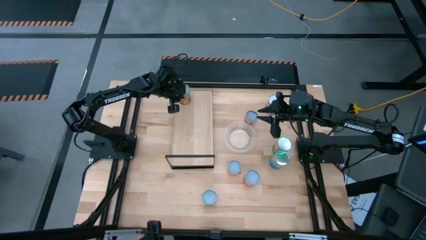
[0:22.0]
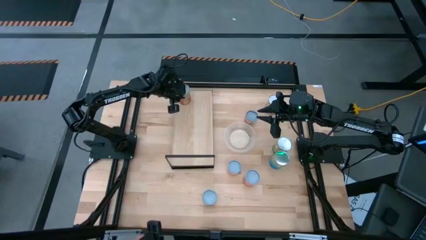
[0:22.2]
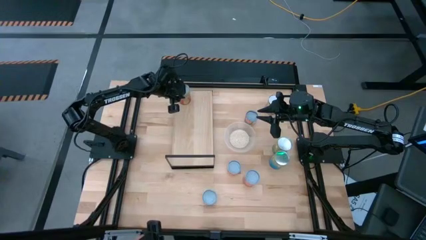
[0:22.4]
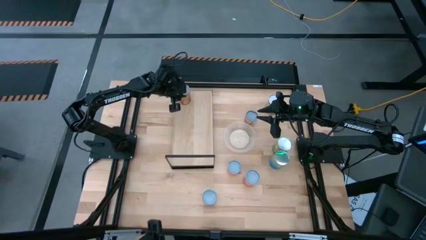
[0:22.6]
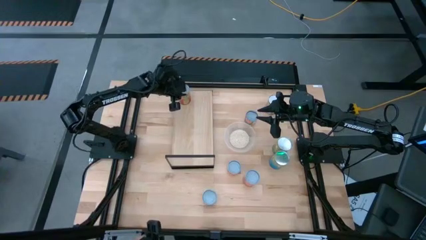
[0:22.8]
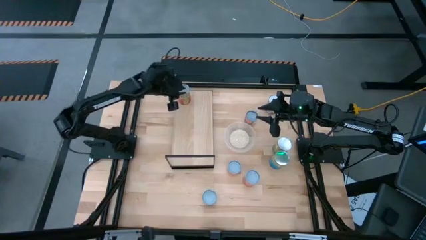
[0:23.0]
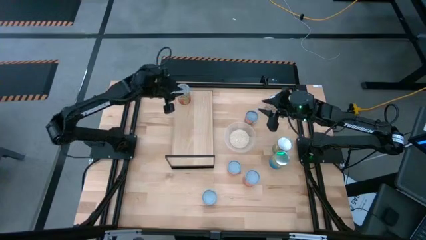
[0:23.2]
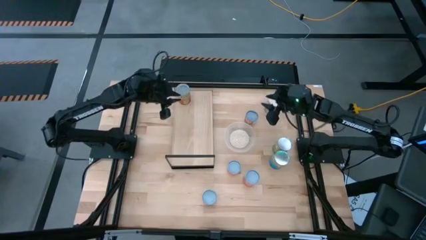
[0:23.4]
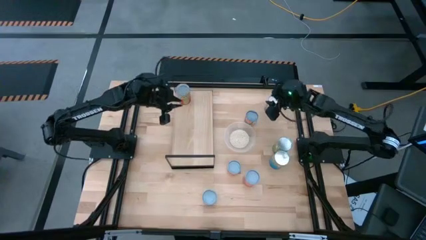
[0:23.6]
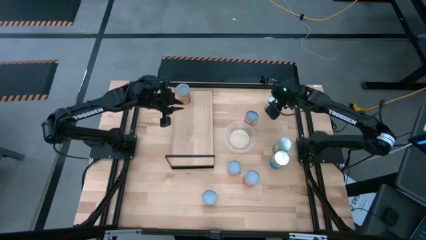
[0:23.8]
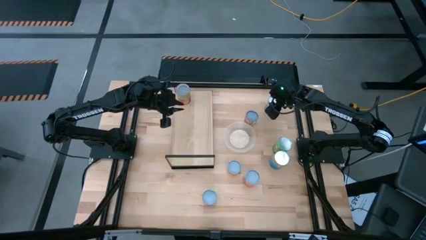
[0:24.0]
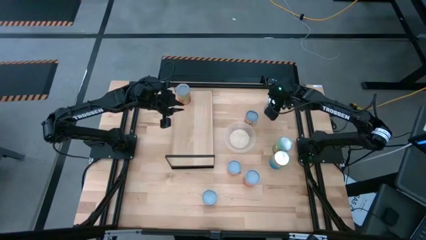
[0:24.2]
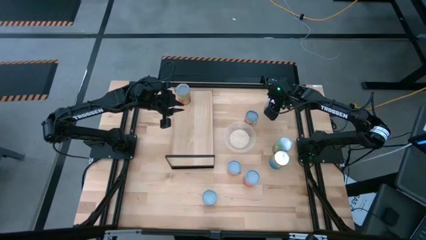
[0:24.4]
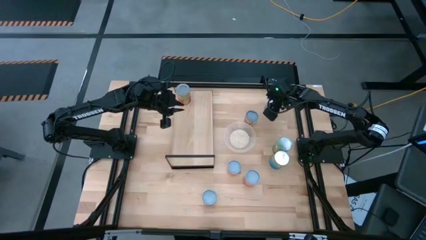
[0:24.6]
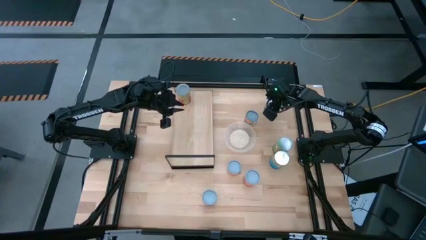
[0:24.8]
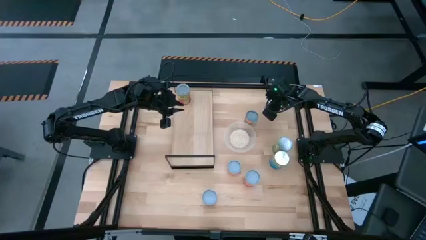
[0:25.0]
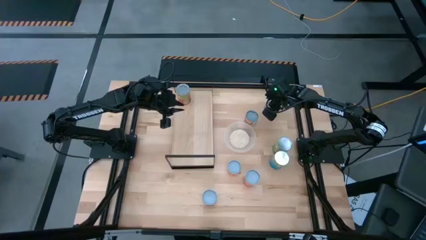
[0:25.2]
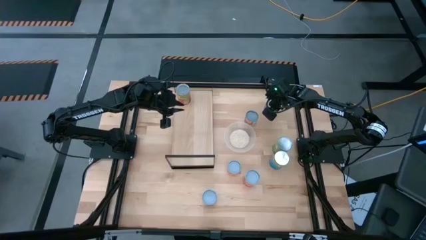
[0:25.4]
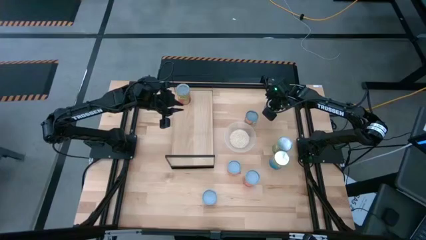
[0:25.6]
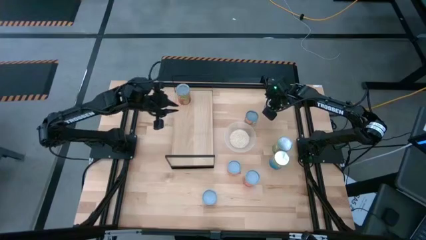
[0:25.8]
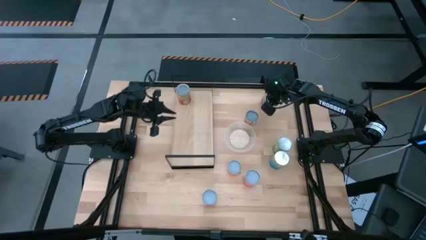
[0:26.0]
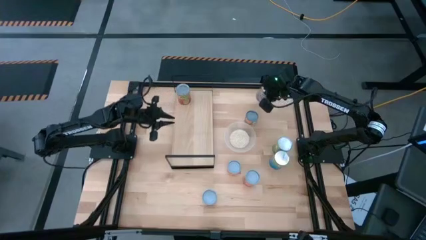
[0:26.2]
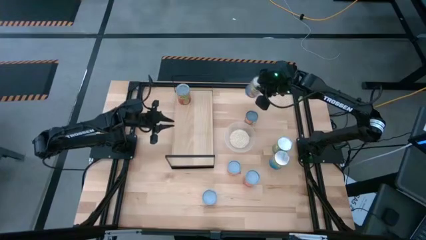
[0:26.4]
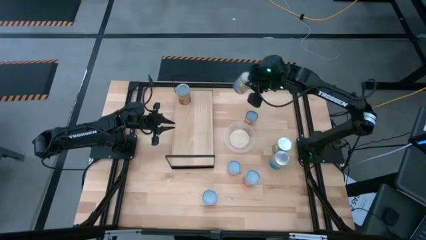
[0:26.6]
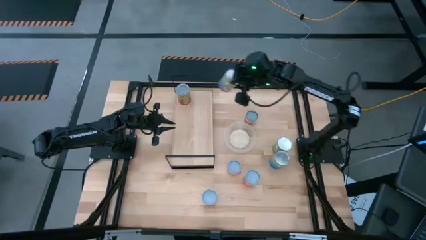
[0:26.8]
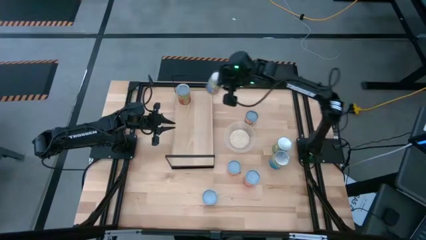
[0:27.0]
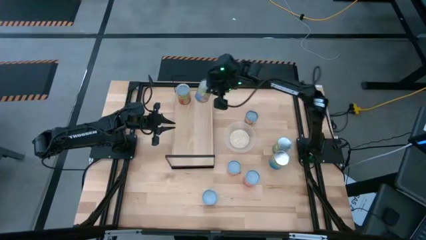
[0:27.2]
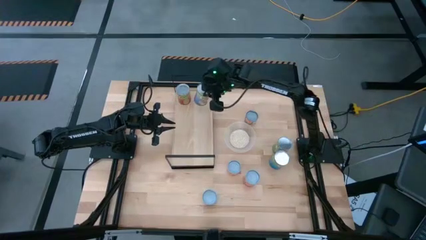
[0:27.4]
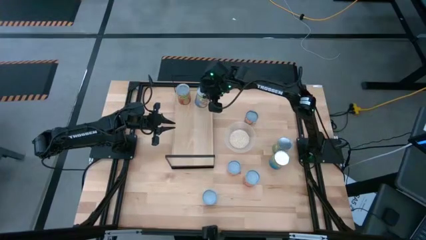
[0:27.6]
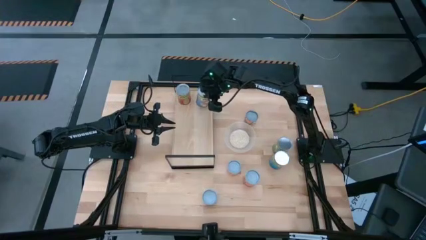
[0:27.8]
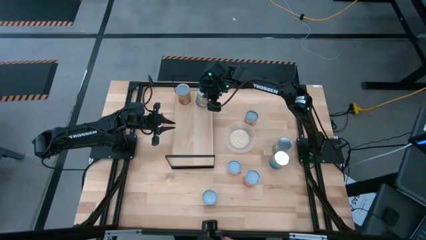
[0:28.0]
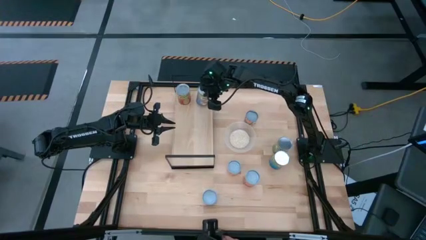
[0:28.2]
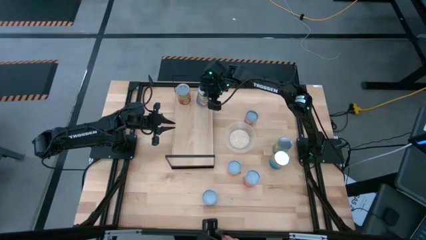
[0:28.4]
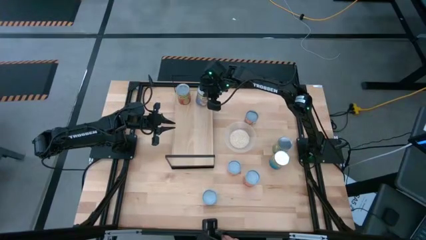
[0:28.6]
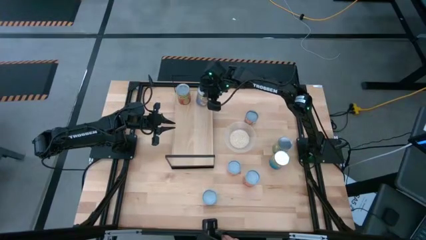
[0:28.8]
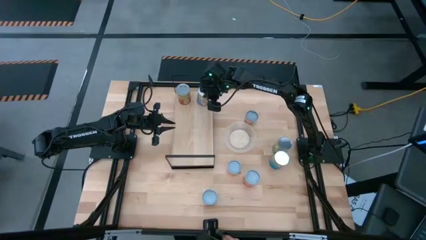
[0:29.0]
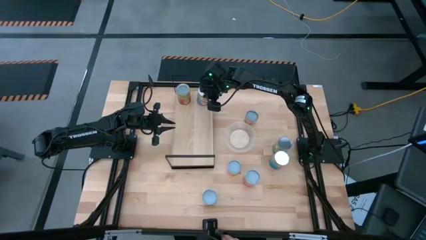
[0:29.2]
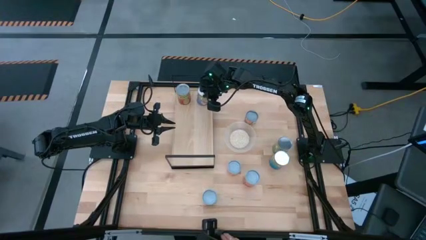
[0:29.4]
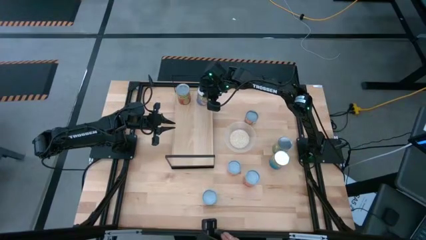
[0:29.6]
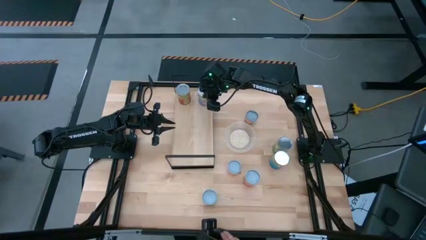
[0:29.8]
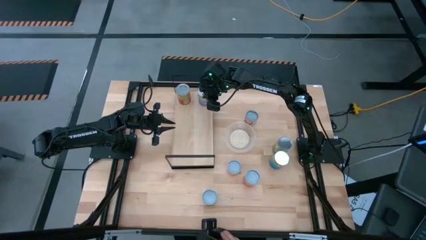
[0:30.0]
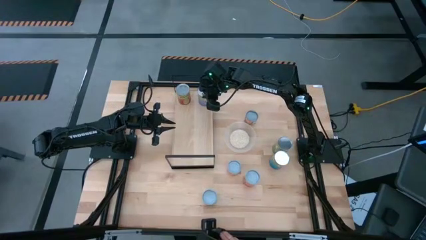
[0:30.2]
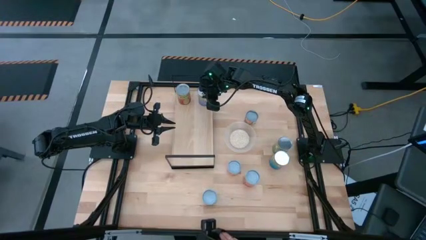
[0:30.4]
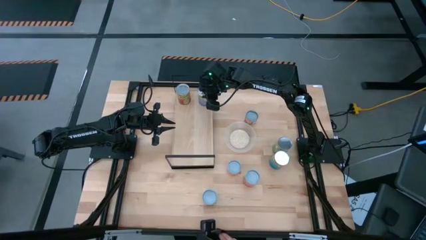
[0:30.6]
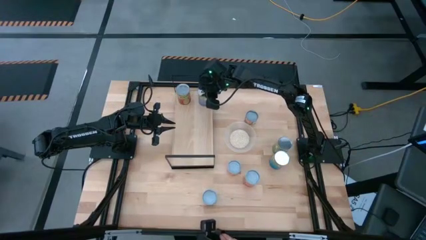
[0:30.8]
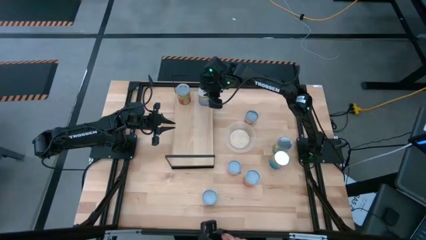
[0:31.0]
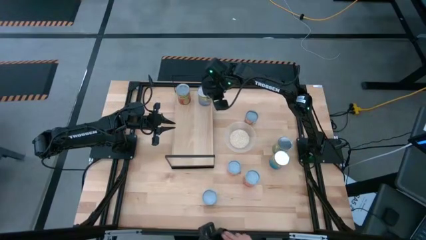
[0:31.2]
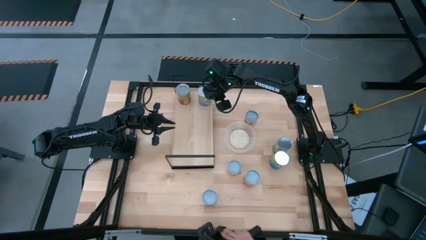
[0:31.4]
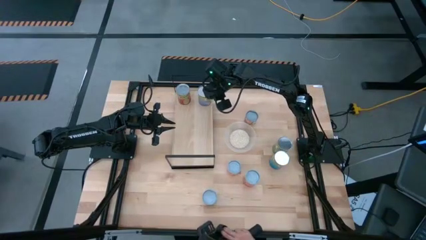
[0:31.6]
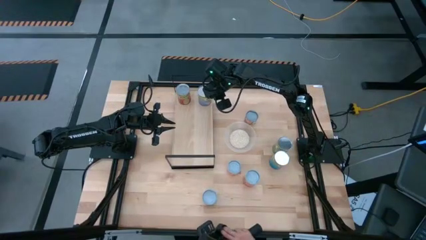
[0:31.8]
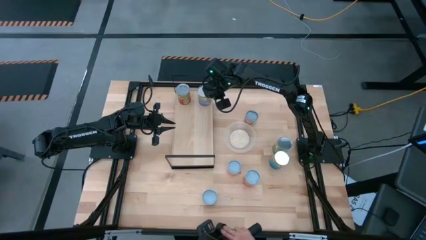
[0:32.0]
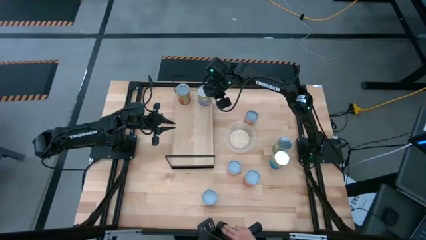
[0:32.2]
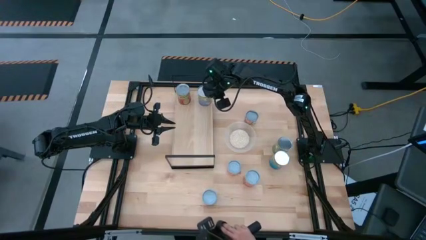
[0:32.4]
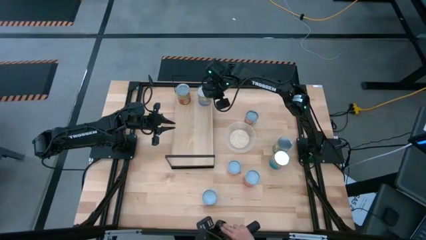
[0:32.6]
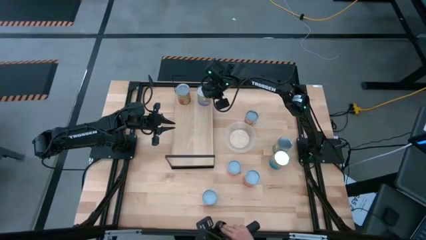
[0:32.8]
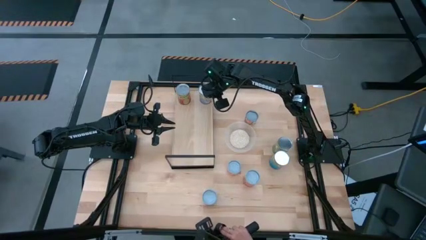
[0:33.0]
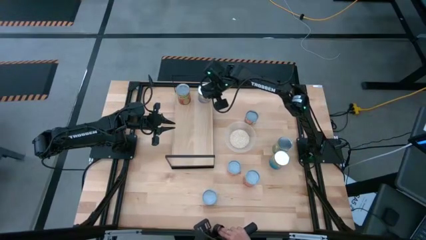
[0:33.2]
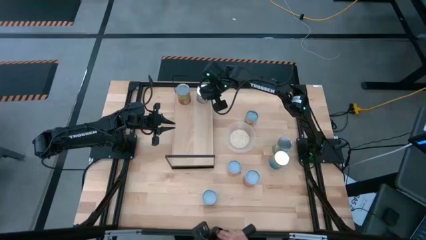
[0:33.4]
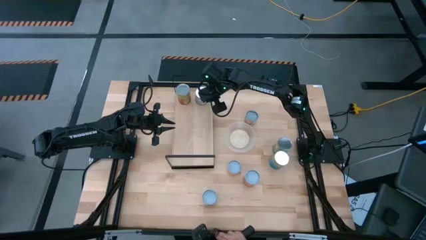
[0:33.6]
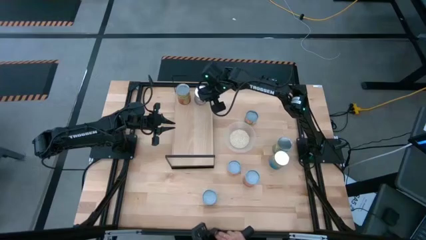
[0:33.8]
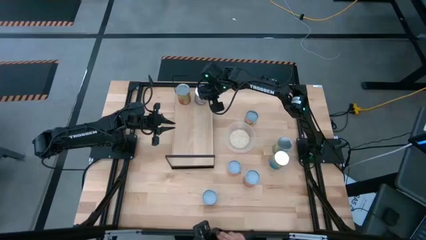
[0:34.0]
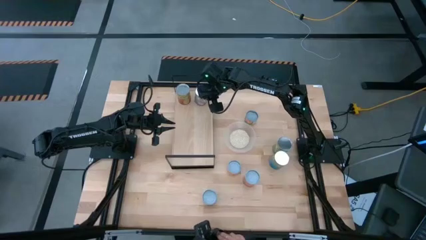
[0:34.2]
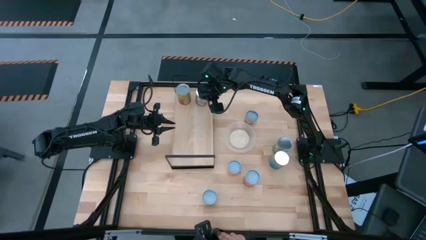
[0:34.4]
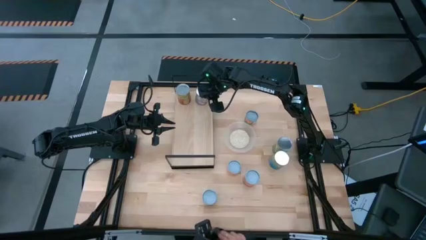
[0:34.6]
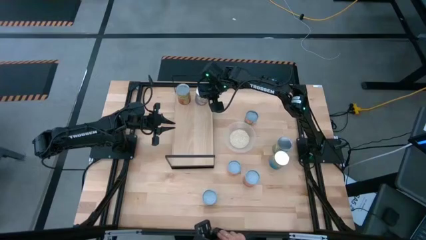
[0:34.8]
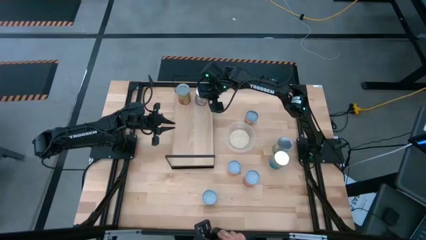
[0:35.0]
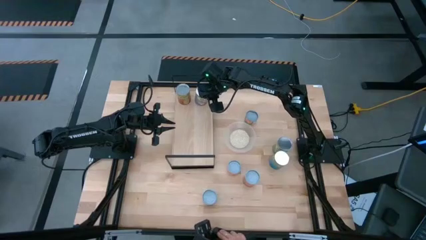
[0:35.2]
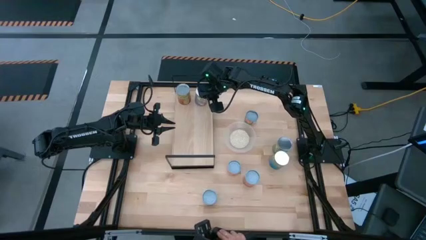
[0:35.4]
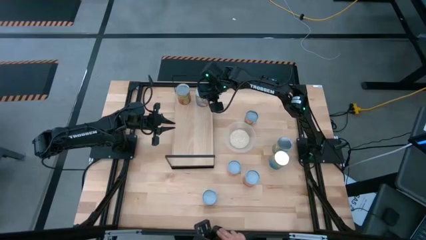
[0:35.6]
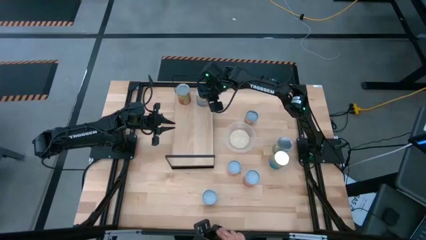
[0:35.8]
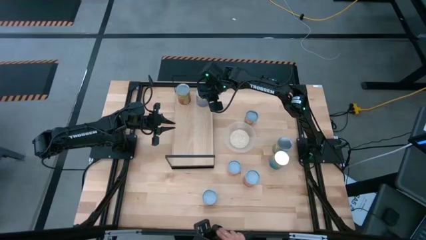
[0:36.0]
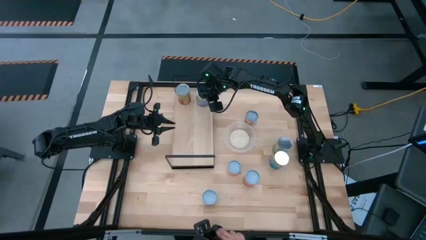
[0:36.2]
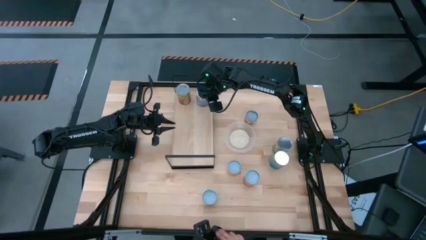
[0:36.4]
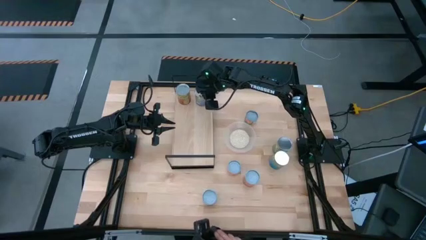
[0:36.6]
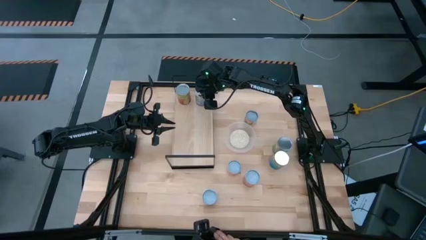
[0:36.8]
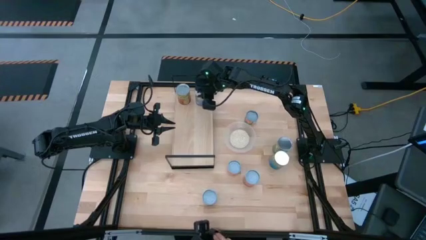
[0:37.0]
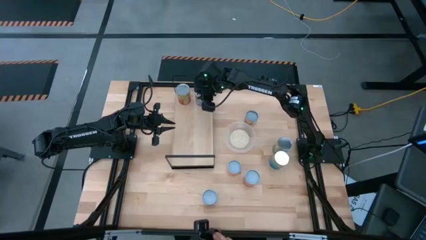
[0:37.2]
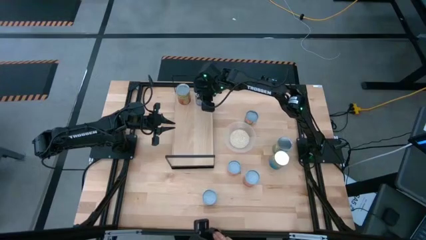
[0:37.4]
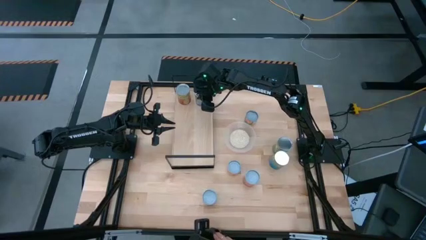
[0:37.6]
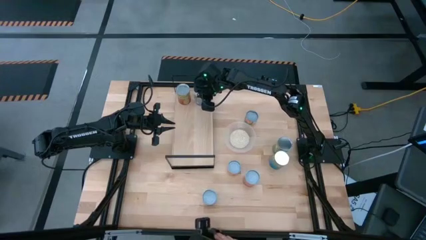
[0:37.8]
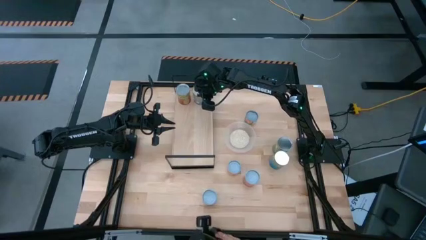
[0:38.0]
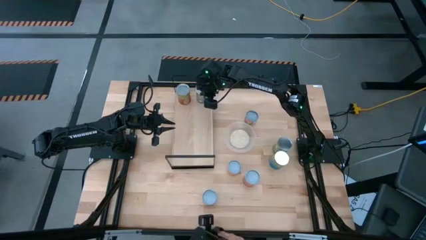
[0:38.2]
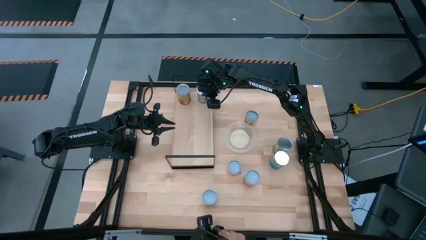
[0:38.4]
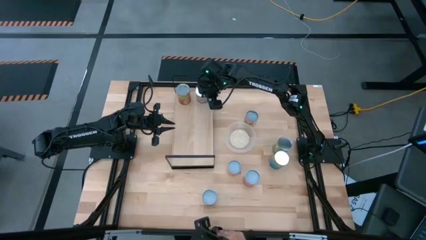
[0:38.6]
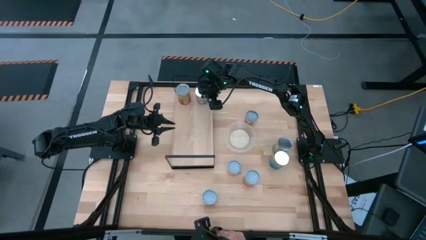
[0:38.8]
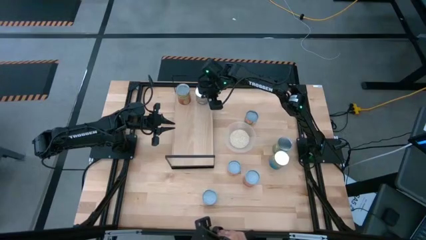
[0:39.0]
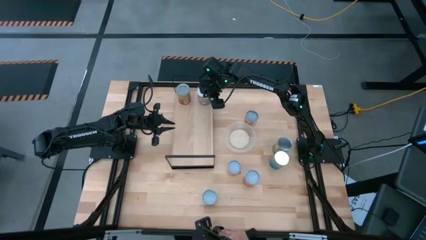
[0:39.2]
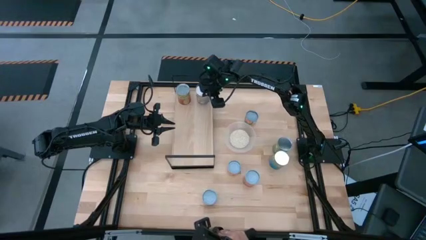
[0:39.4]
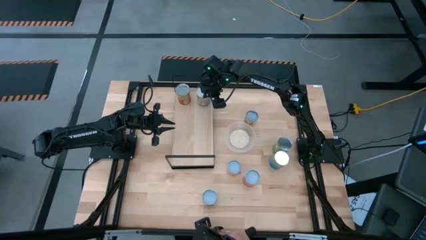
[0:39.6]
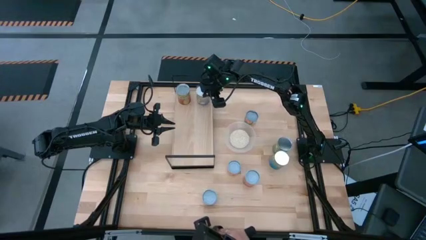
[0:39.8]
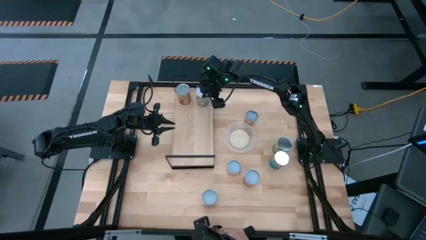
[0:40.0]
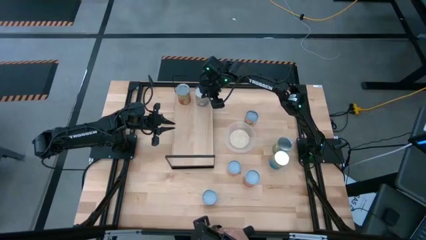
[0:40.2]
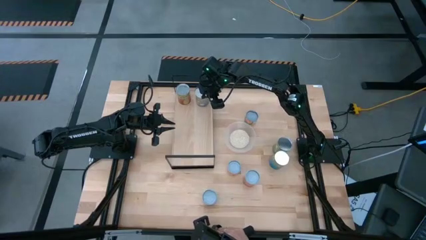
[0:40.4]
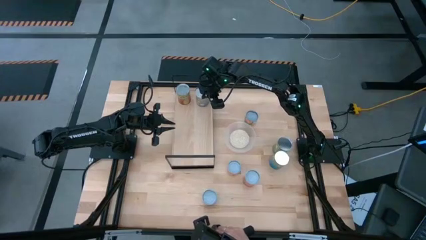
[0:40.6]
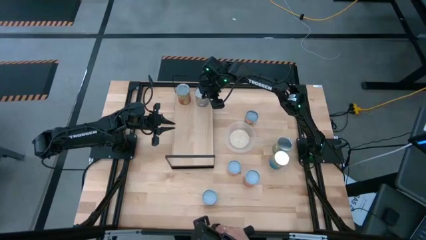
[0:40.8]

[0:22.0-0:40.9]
Task: Pick and place cans onto a shelf
Put the large canned peaches on the shelf
